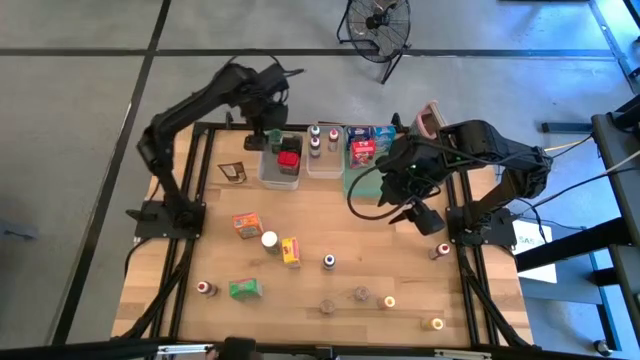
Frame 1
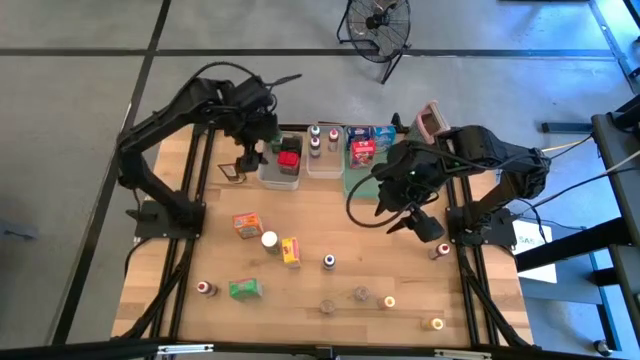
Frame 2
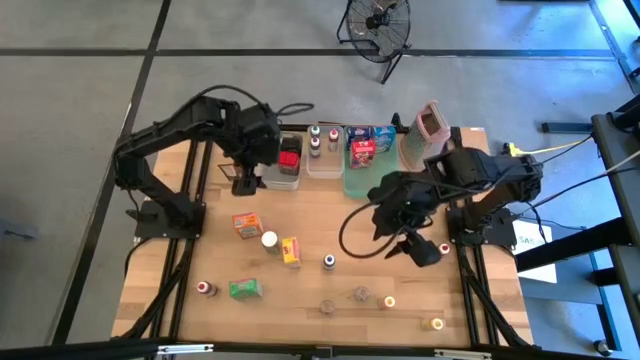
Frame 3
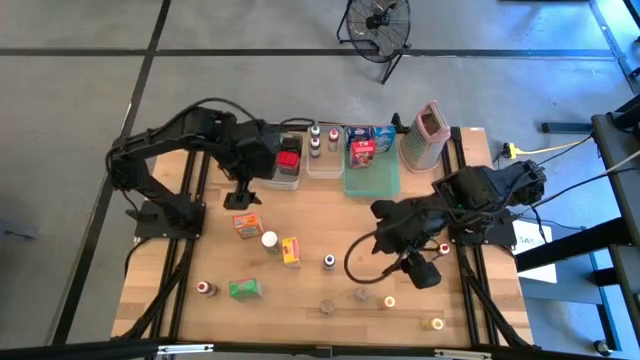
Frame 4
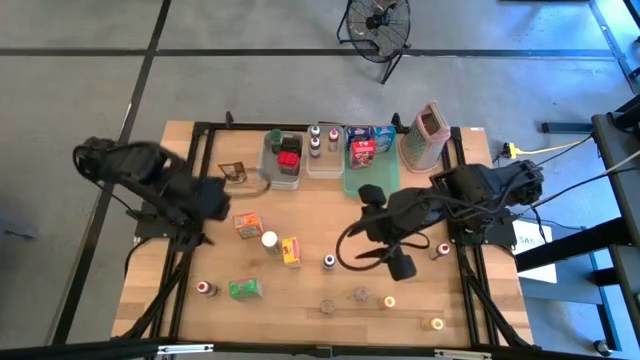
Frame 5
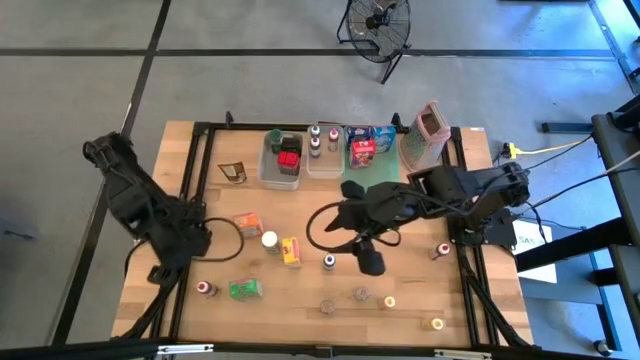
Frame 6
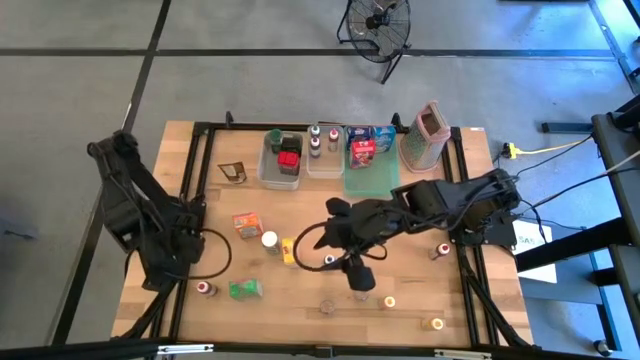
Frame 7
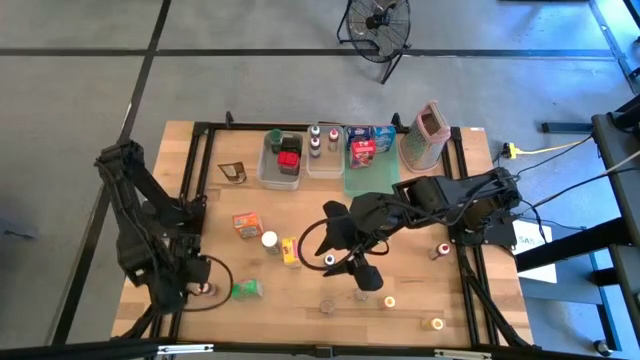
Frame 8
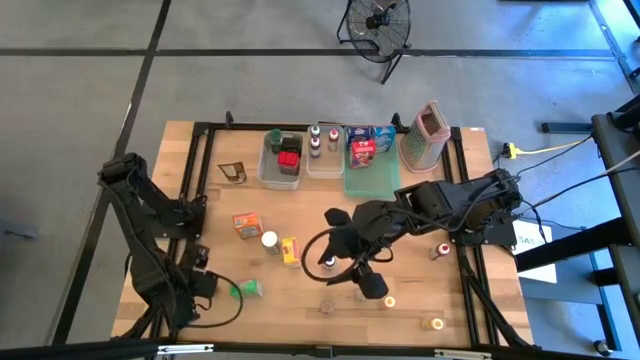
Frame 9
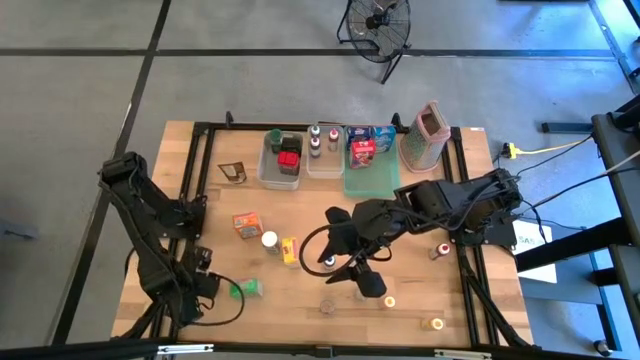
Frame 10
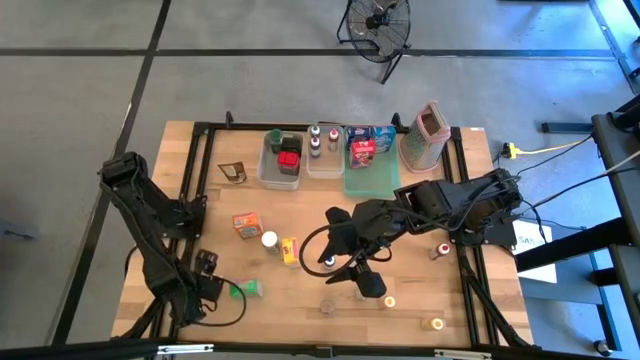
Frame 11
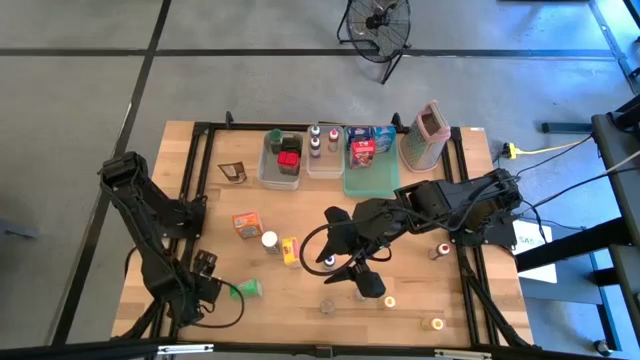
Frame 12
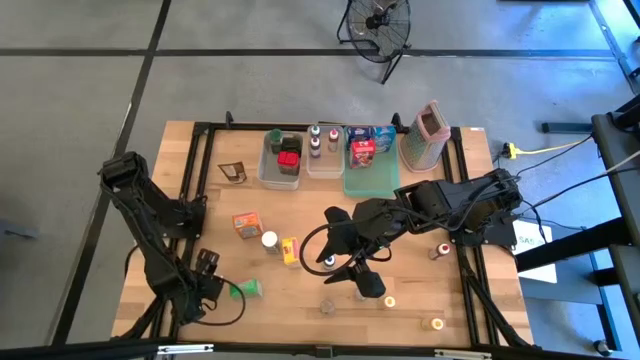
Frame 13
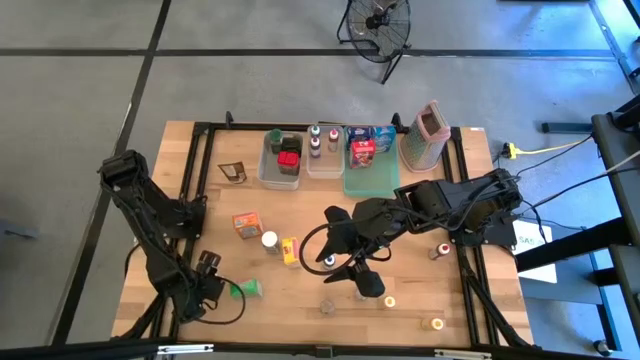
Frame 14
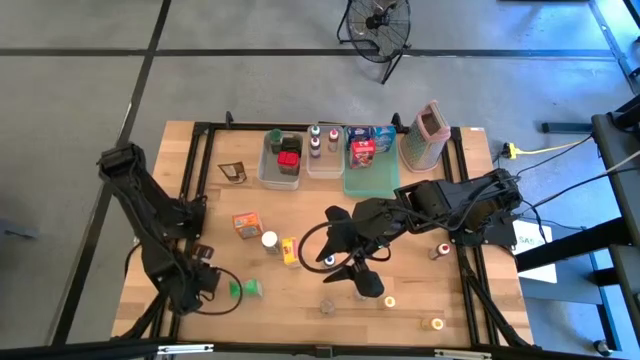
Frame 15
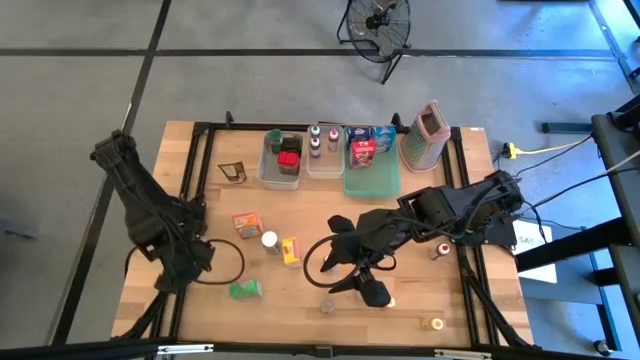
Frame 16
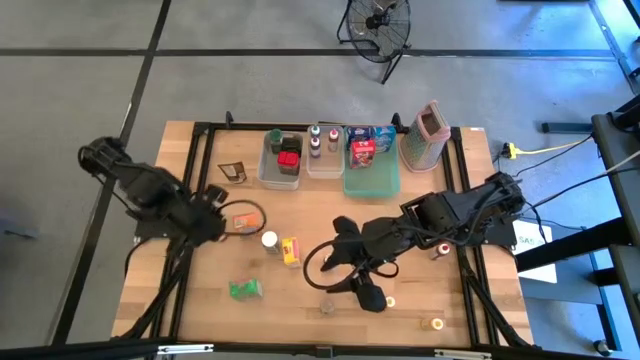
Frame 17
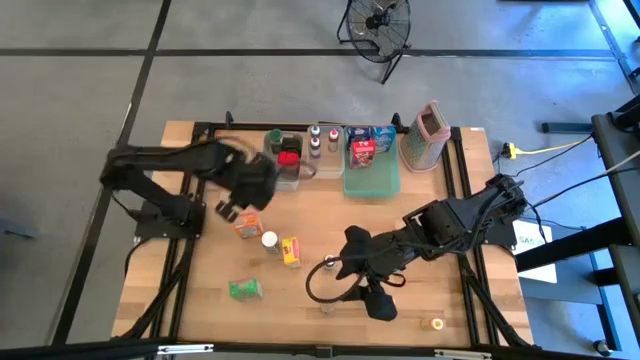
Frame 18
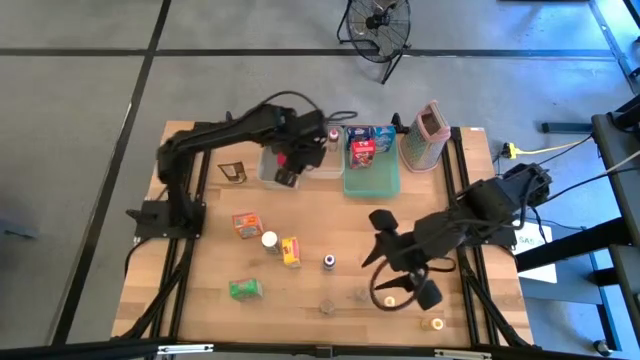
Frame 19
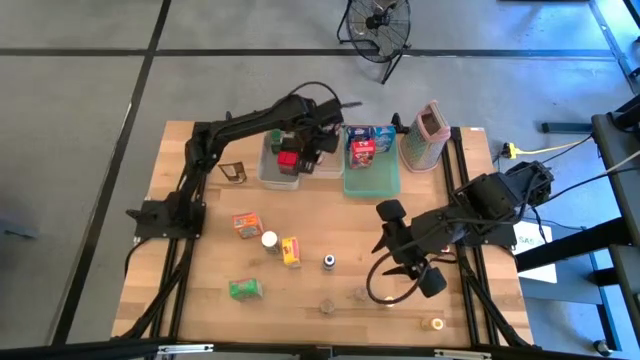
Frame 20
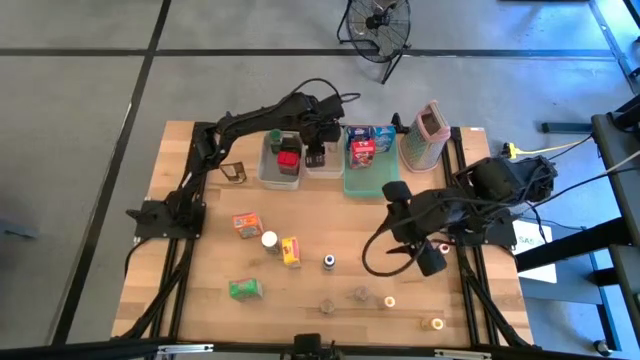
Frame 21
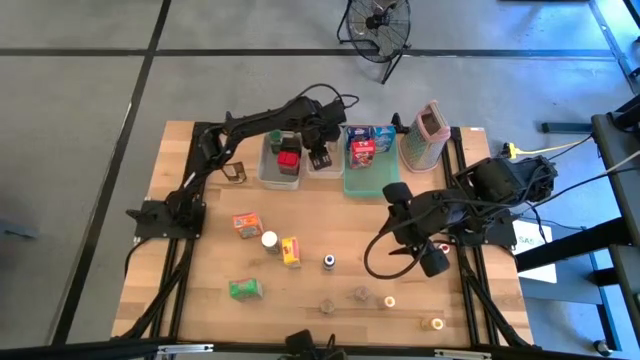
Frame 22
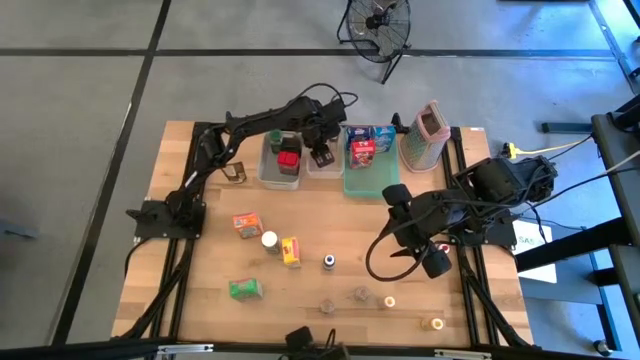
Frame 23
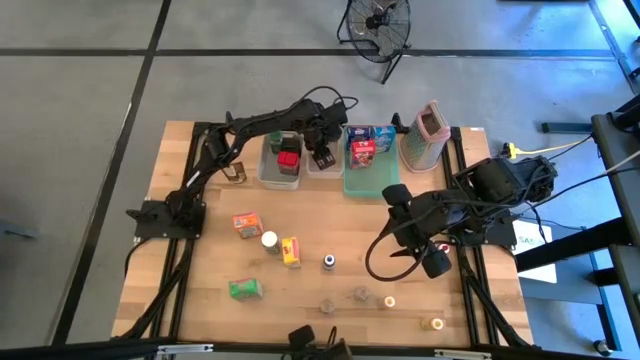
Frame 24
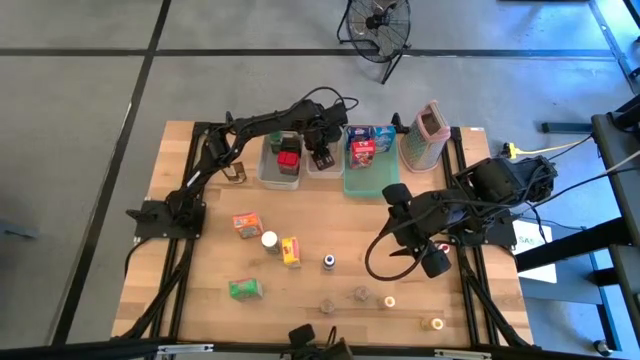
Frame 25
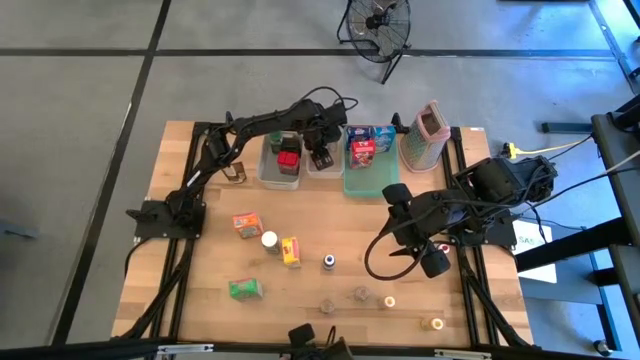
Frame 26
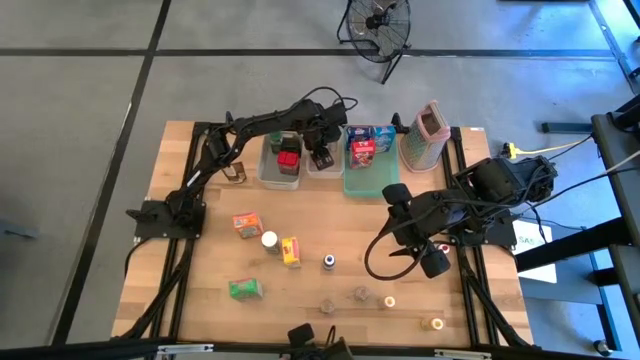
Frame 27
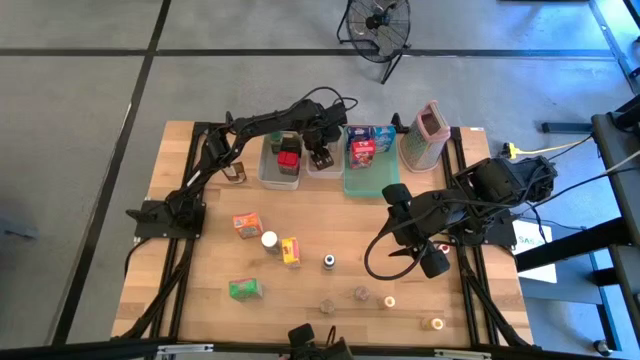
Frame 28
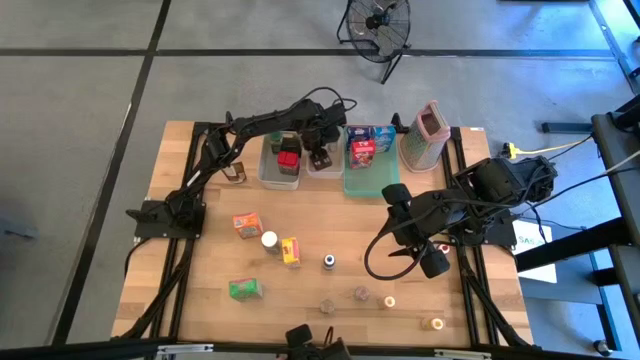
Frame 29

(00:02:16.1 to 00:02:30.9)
Task: Pick & Place Kitchen Items
Put the left red food coloring bottle into the transparent bin

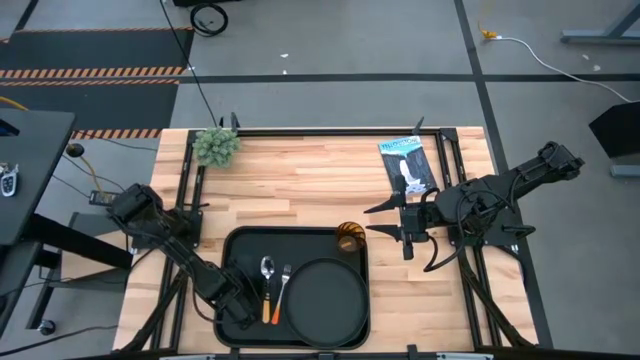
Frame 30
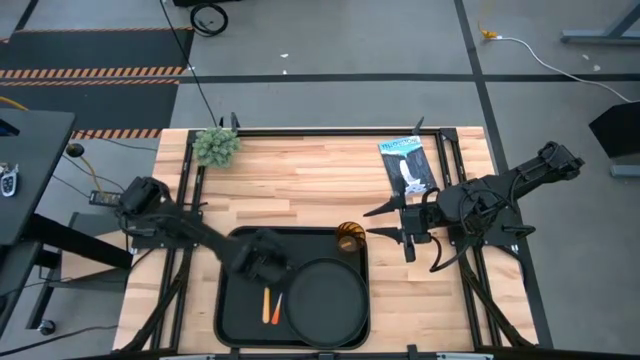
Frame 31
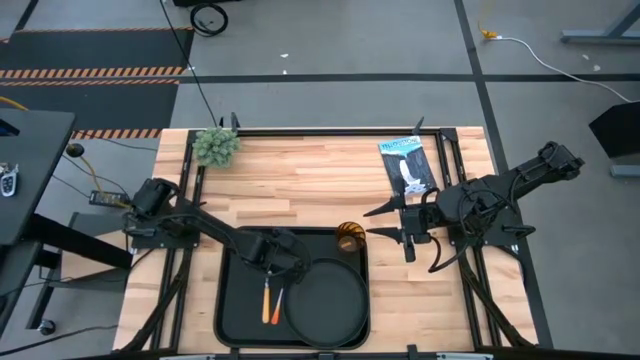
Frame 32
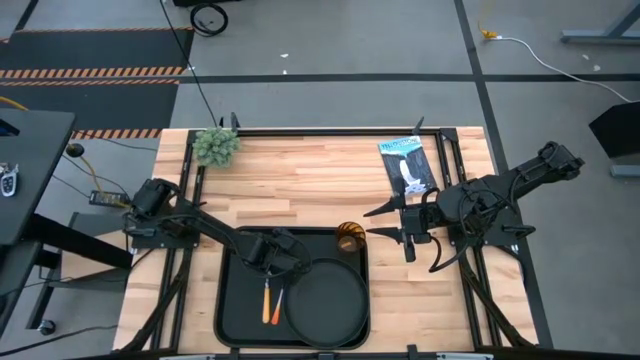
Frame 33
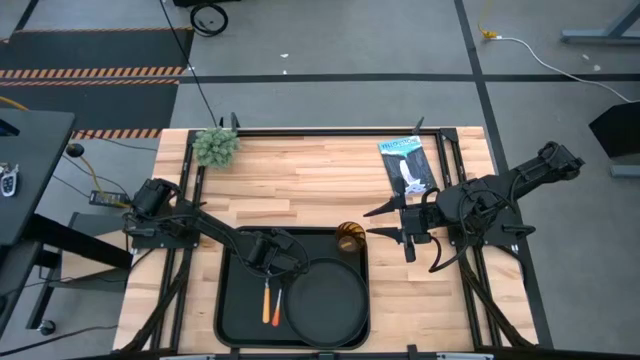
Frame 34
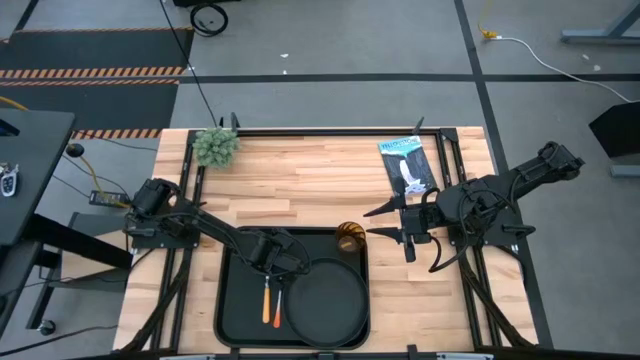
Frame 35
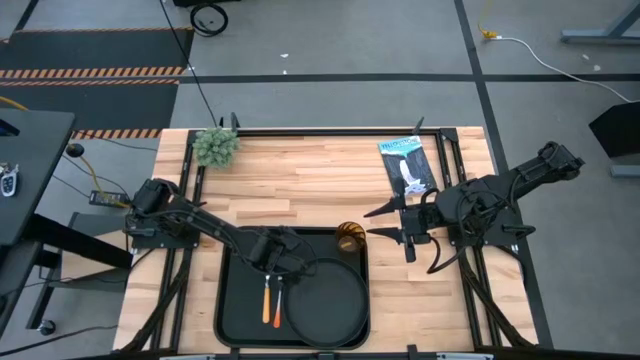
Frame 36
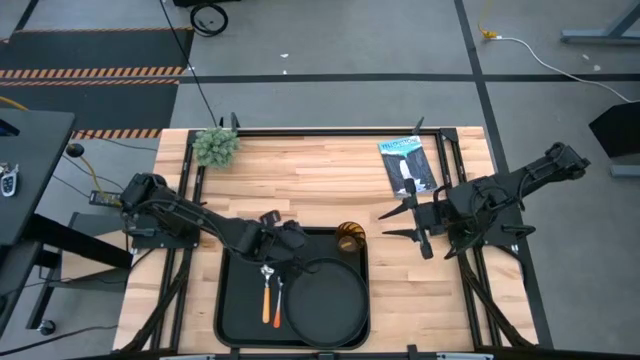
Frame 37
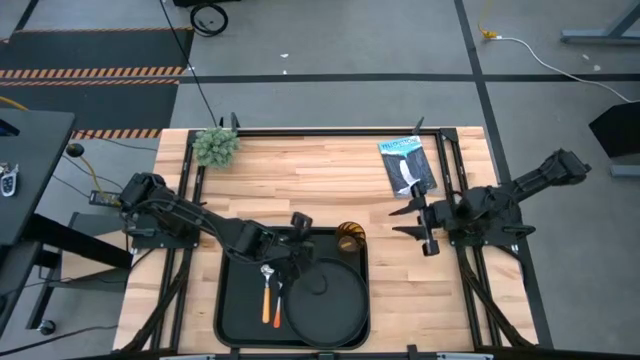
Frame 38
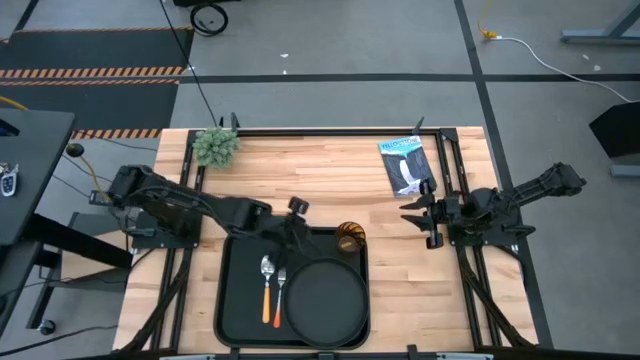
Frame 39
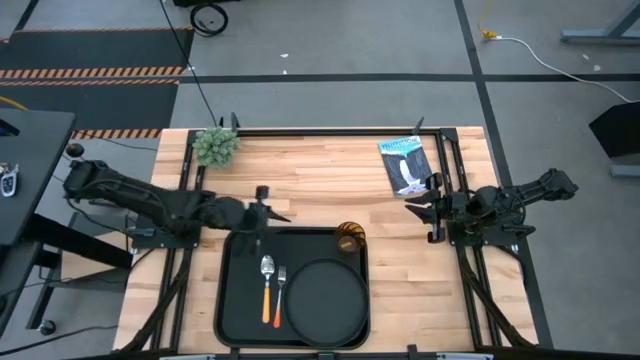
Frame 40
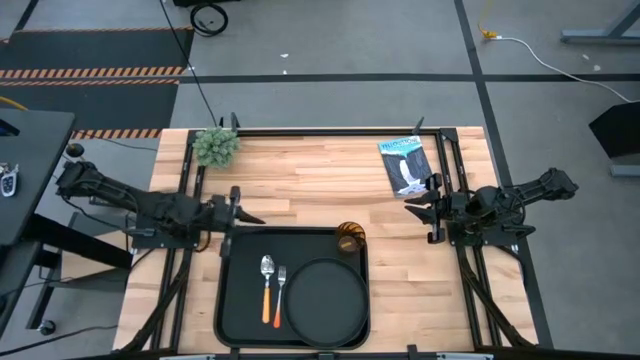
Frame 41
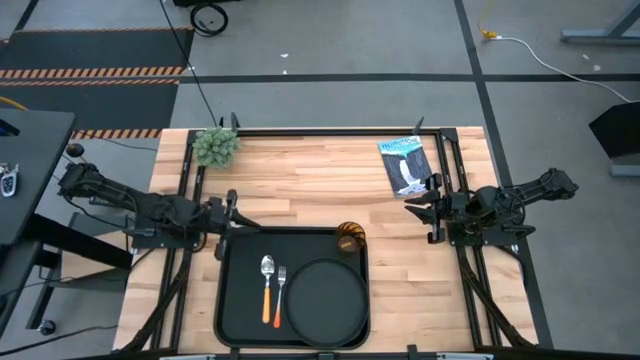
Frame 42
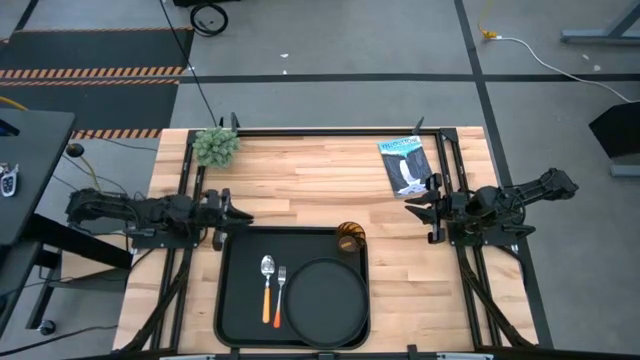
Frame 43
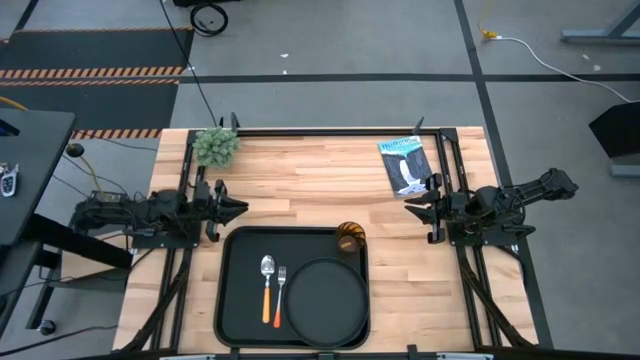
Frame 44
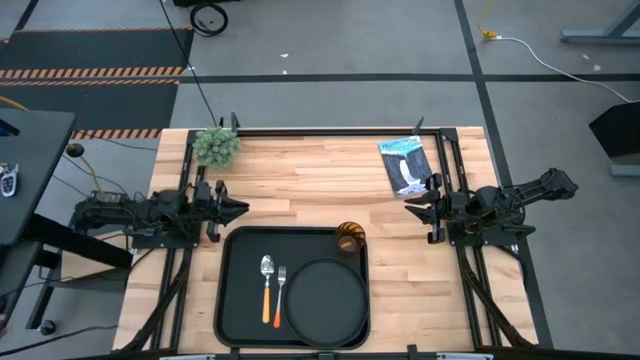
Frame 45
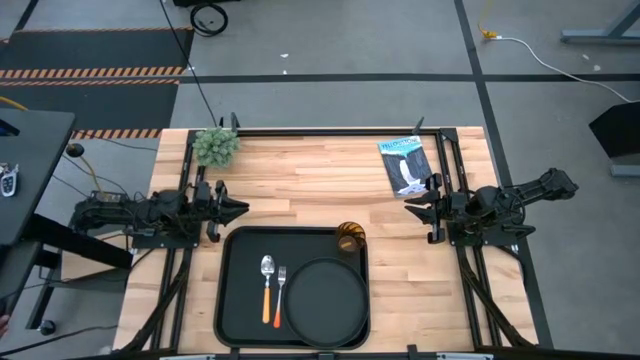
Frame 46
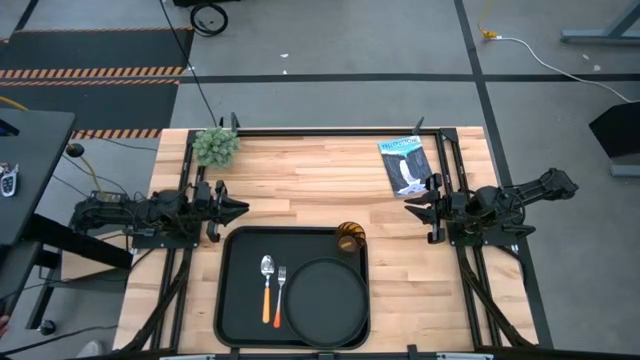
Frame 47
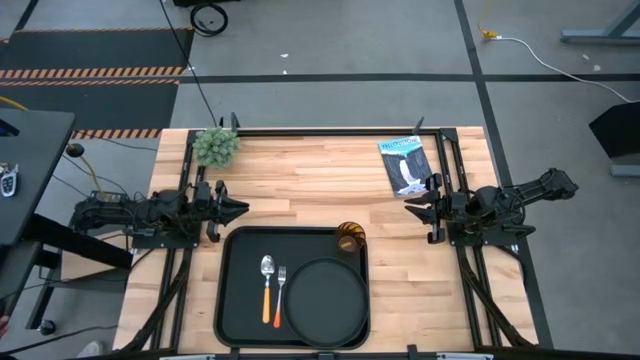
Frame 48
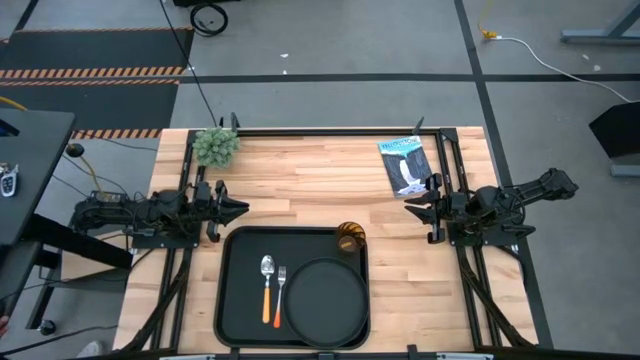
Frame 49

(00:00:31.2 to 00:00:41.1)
Task: Pick and place plate/cup/fork/spoon on tray
Return to Home Position
